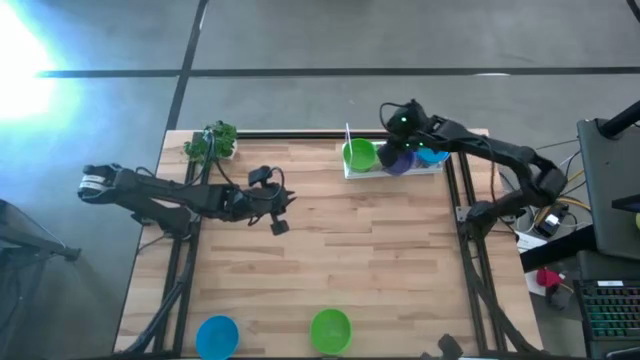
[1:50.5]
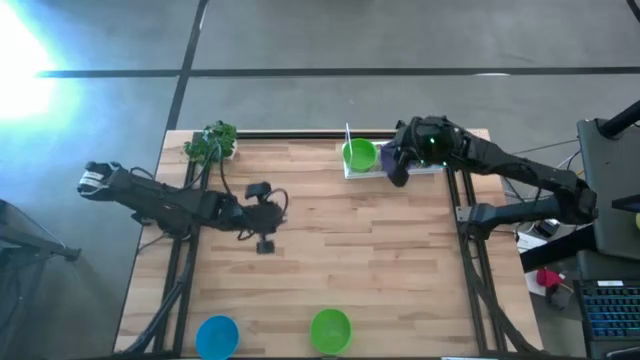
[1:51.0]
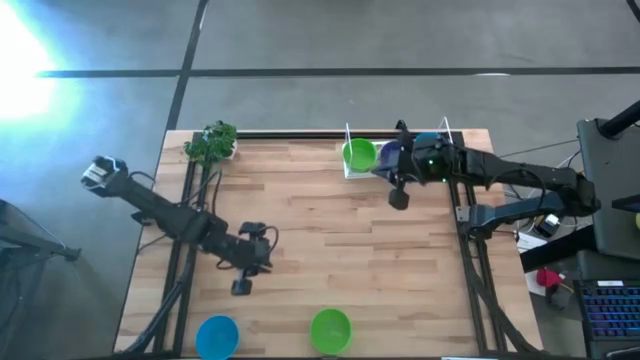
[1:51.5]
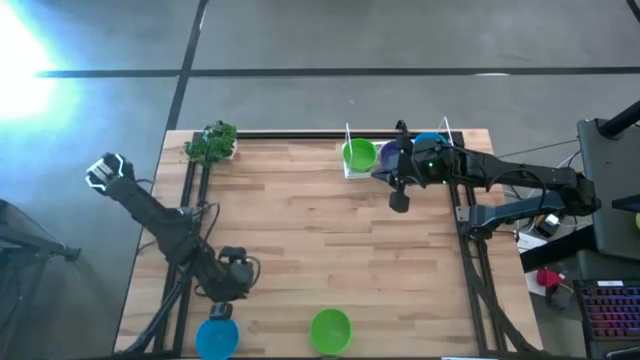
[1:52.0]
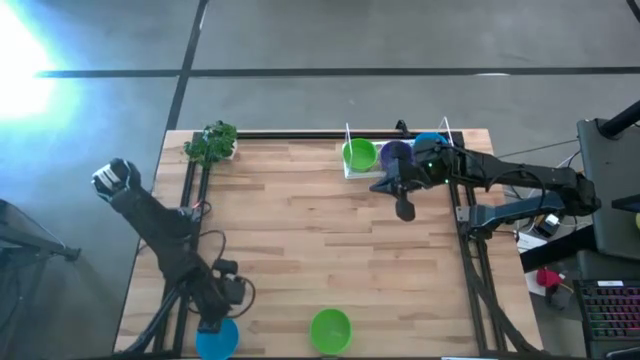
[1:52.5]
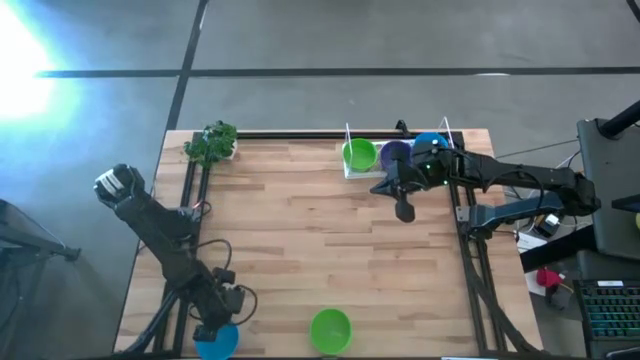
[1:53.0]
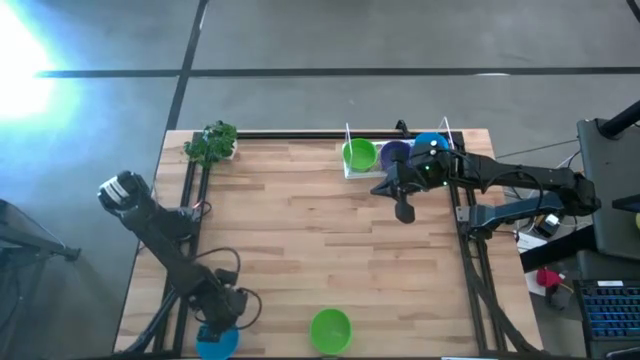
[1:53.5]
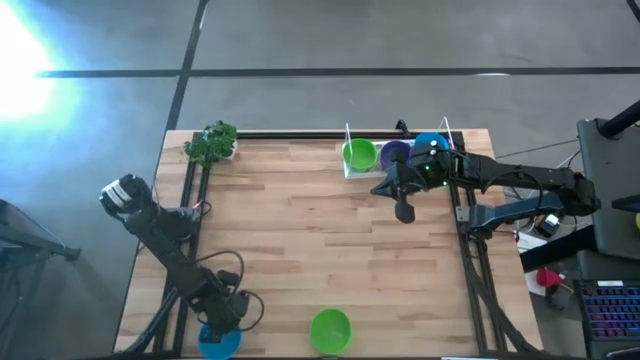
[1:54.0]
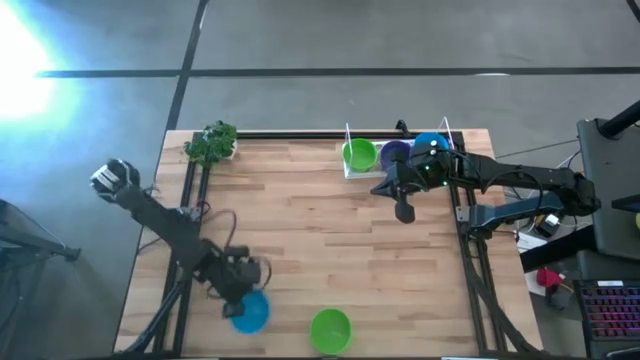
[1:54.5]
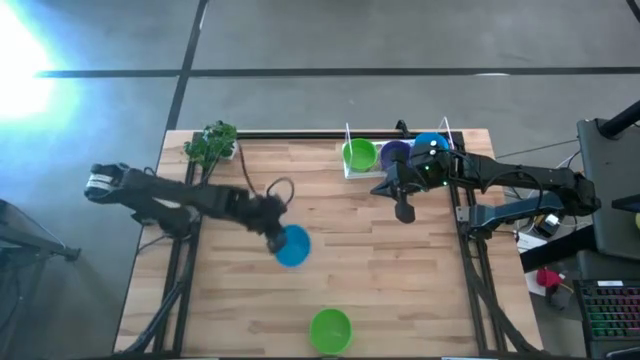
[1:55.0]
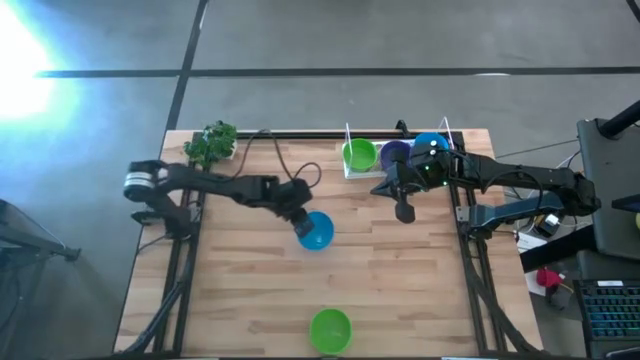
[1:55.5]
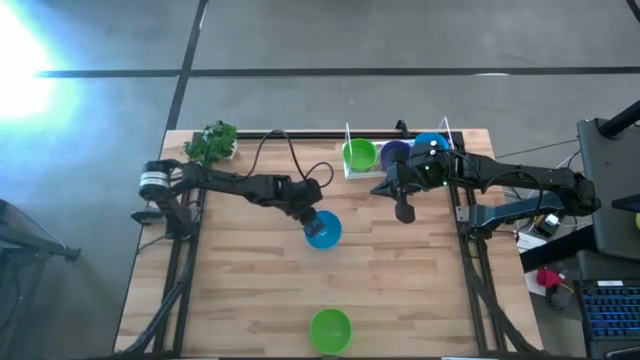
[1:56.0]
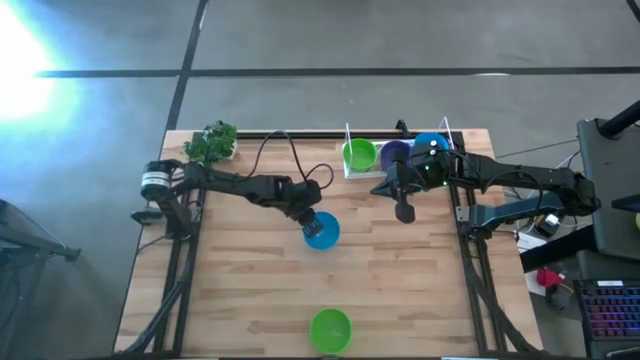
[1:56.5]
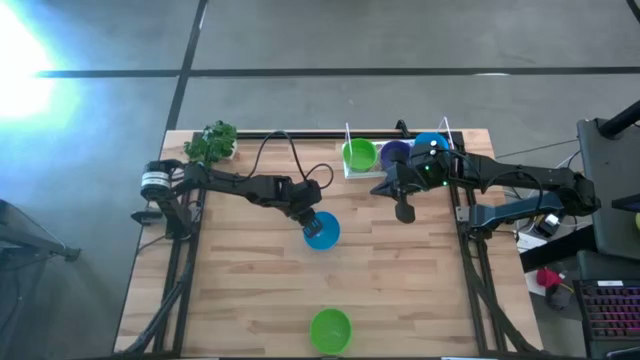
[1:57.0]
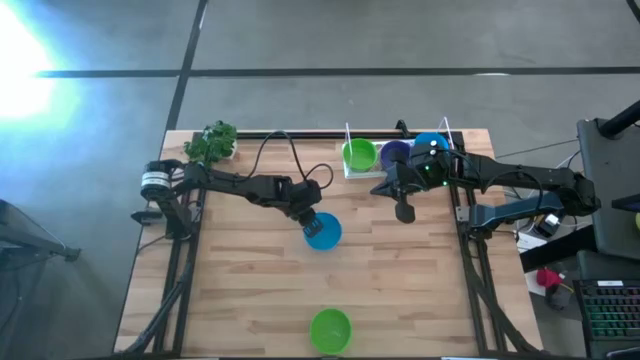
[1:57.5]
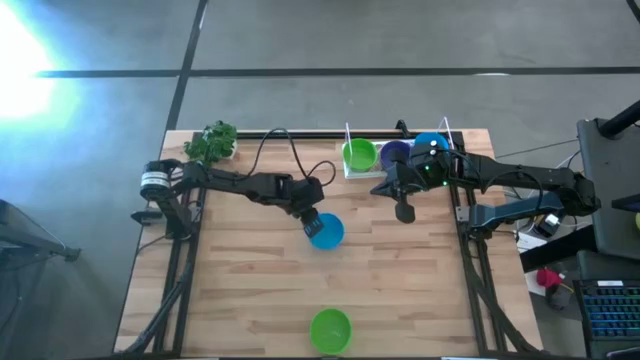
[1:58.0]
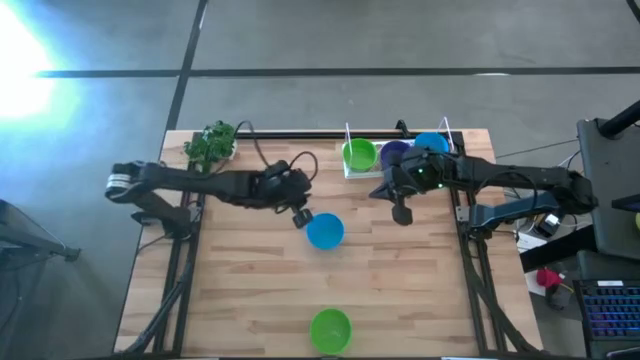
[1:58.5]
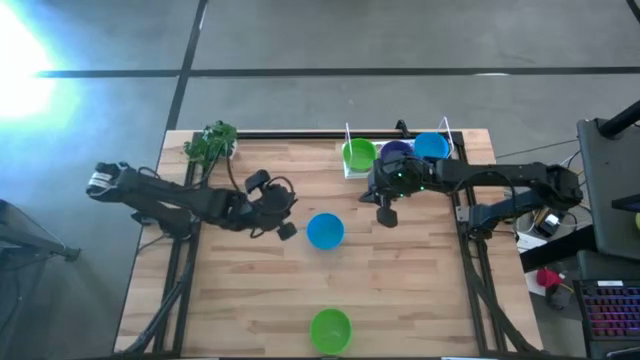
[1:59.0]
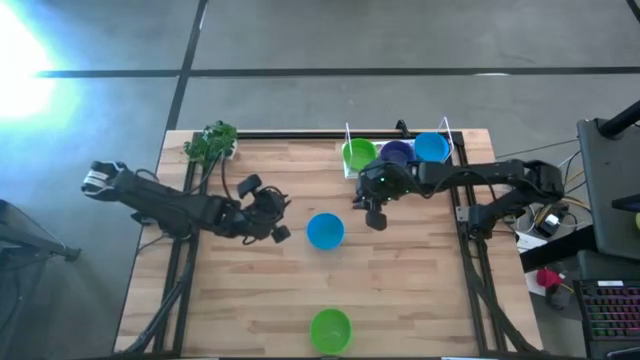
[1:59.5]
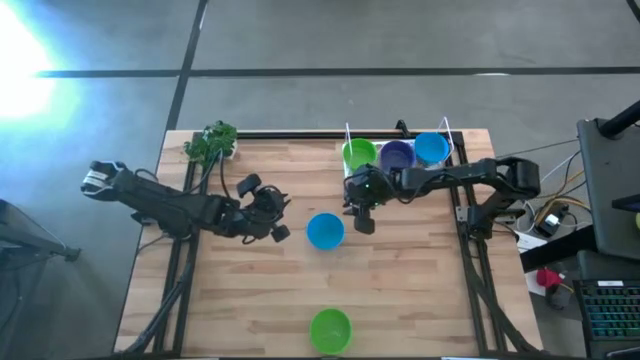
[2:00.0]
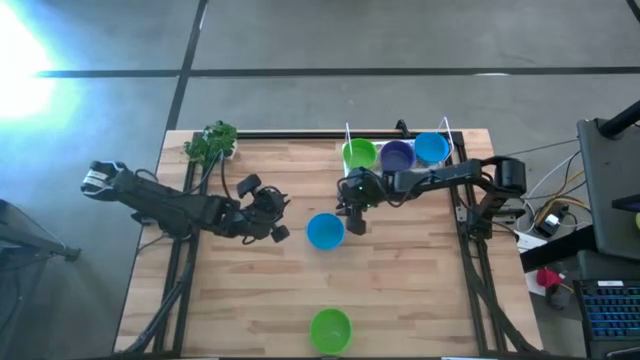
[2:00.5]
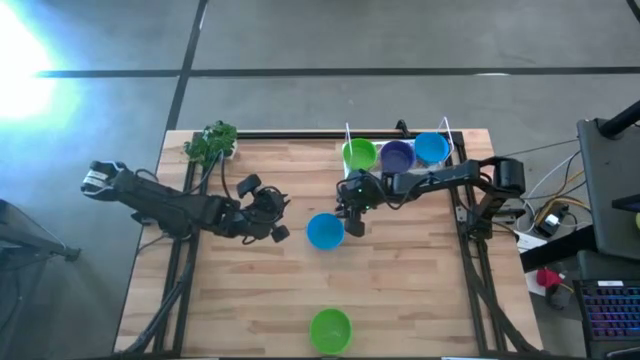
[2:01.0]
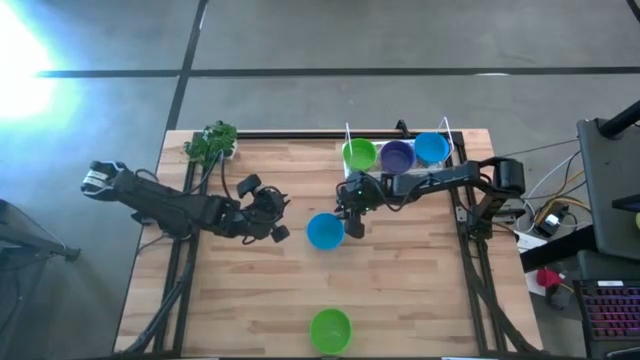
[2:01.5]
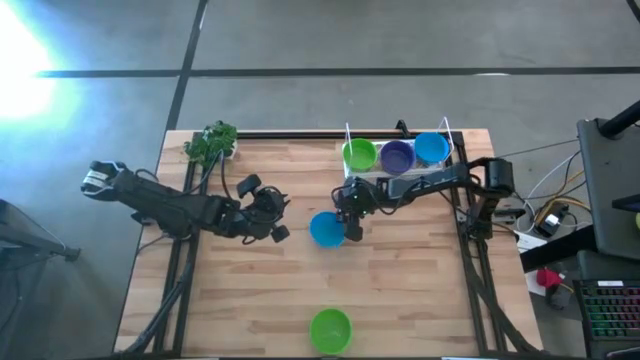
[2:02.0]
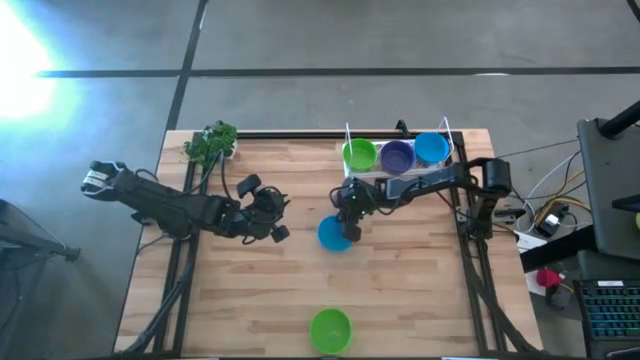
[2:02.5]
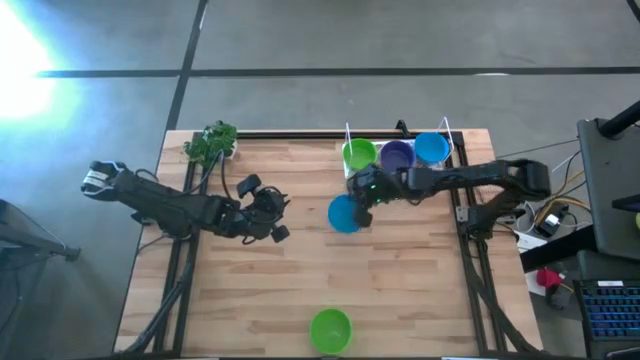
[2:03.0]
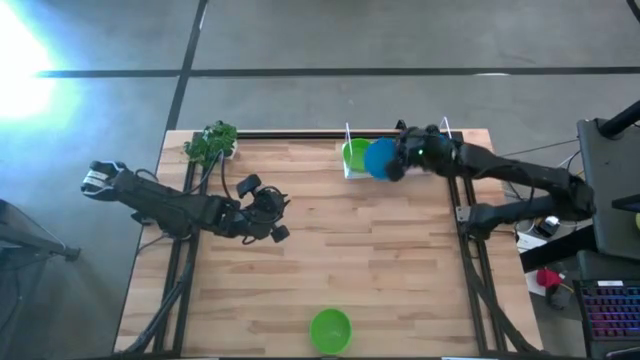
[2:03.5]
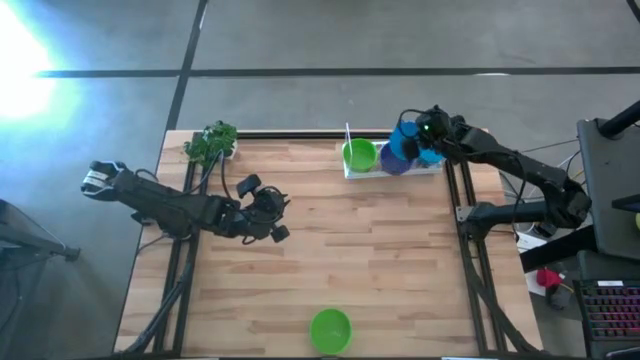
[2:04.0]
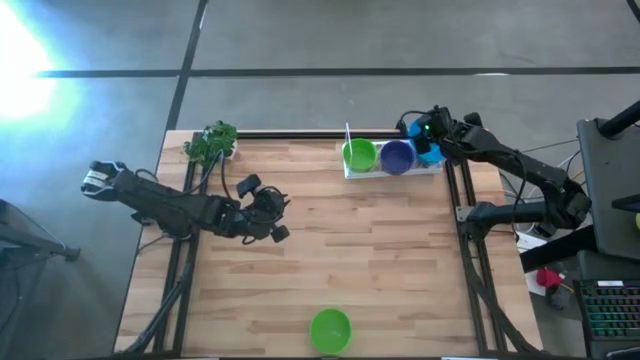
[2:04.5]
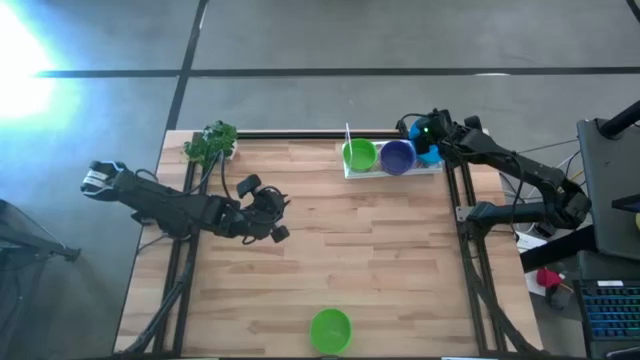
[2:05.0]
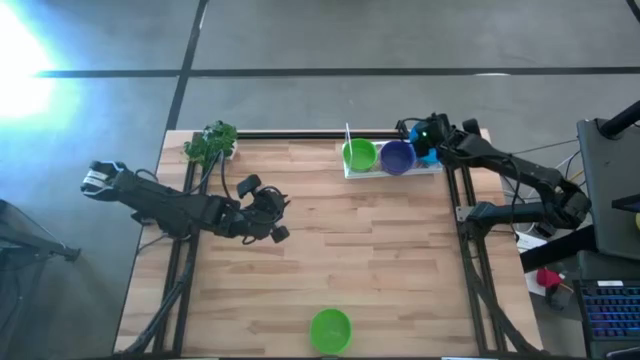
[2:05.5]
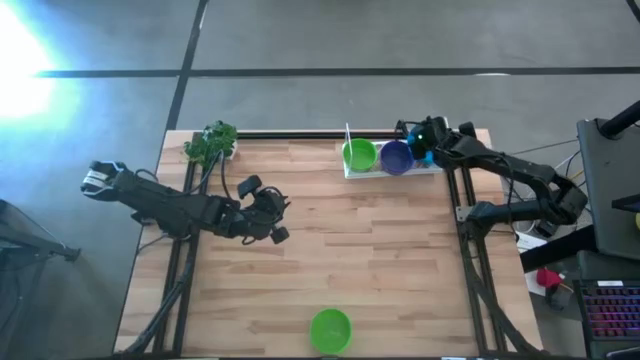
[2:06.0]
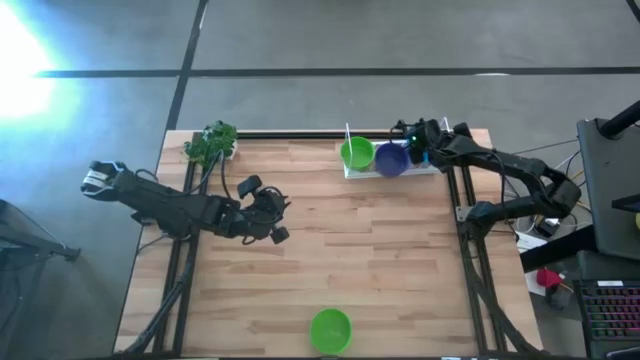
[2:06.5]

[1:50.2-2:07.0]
Task: Pick & Place Mini bowls
Stack the blue bowl on top of the blue bowl on the shelf

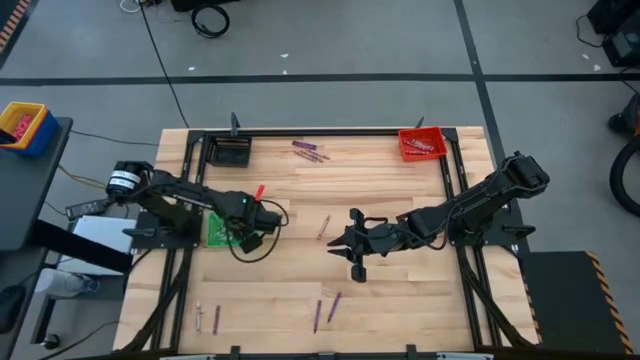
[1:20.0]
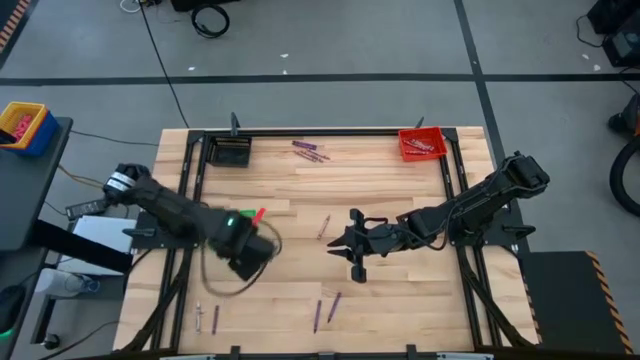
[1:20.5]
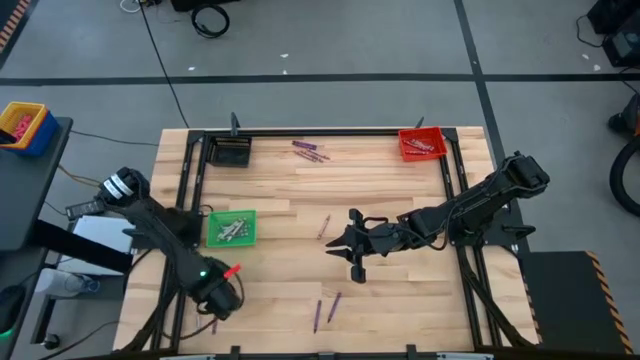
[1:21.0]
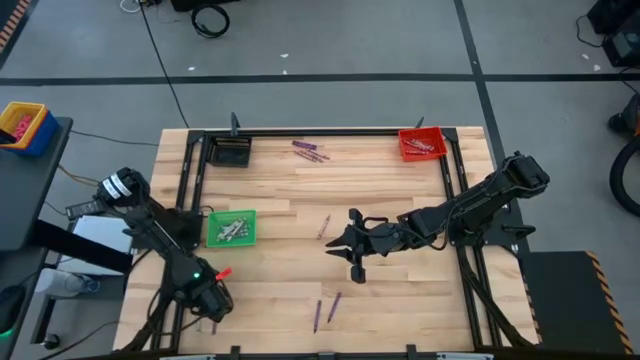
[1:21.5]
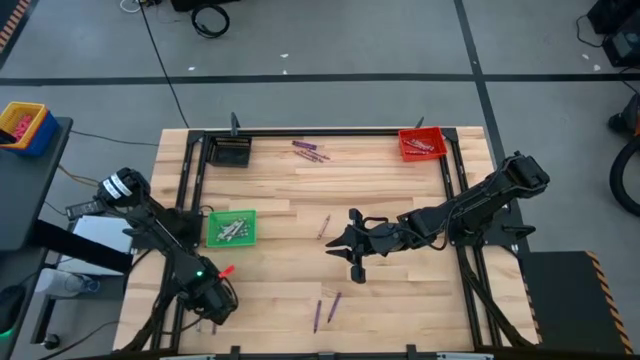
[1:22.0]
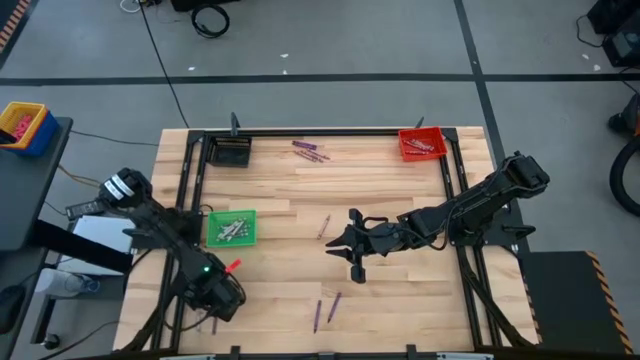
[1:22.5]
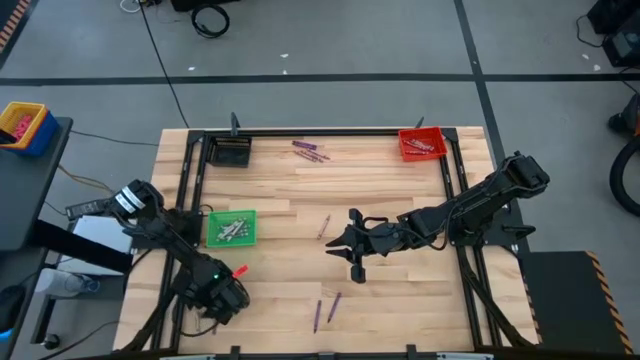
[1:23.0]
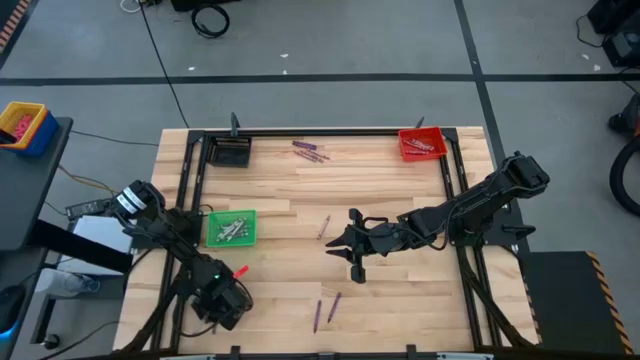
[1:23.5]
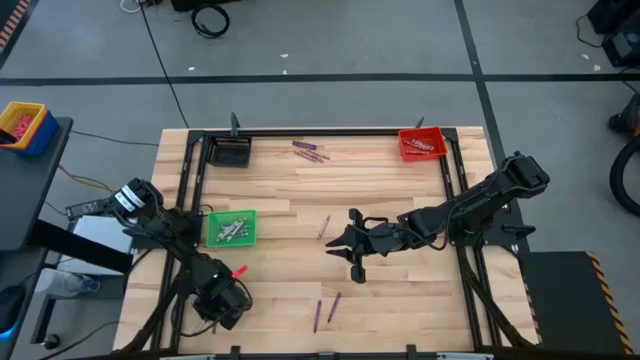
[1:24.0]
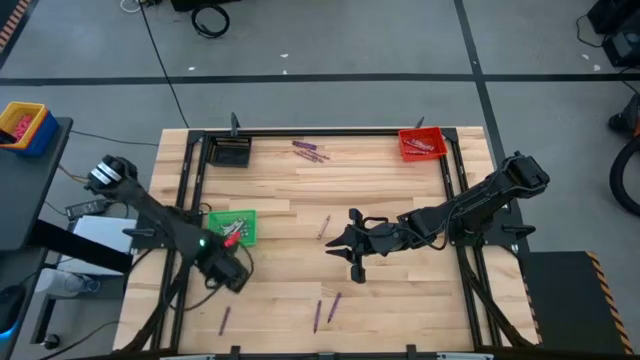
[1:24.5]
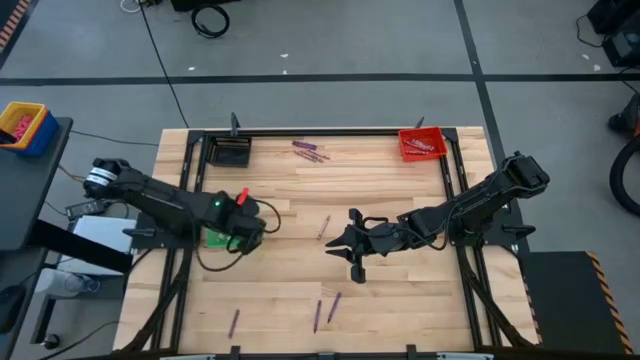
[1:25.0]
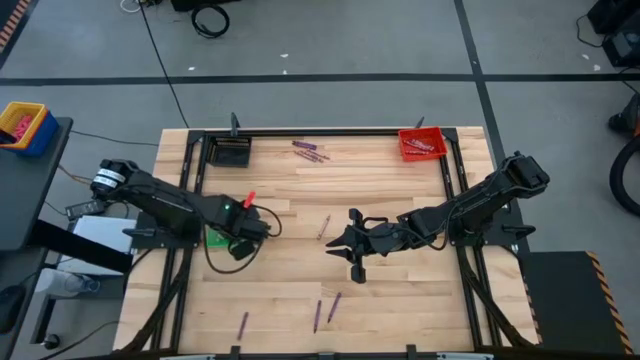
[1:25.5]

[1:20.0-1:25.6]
Task: Sort crayons
Put the white crayon into the green bin
